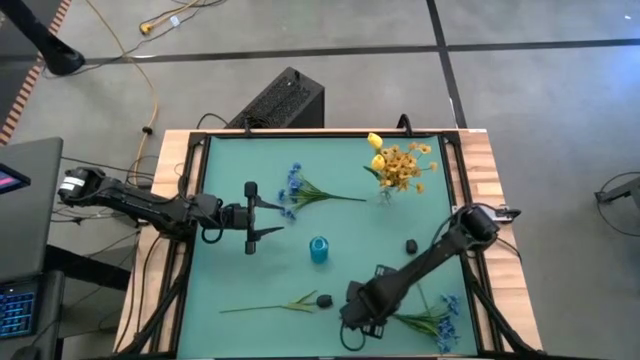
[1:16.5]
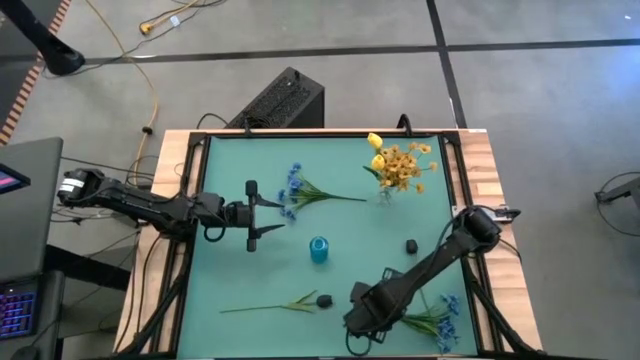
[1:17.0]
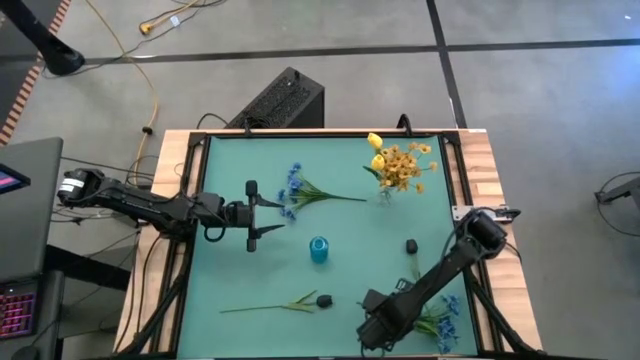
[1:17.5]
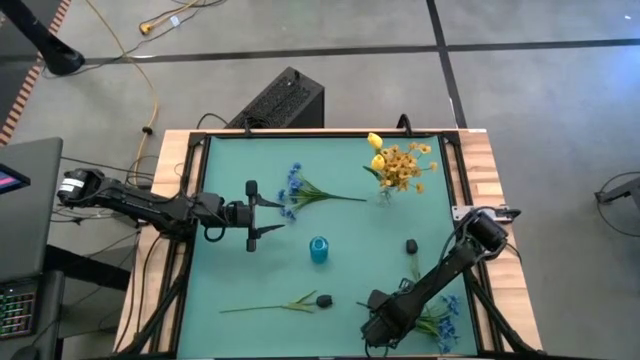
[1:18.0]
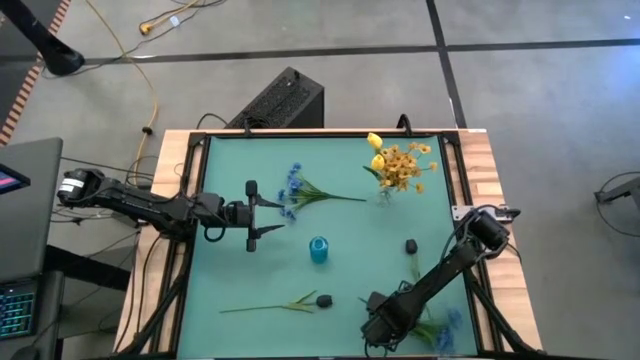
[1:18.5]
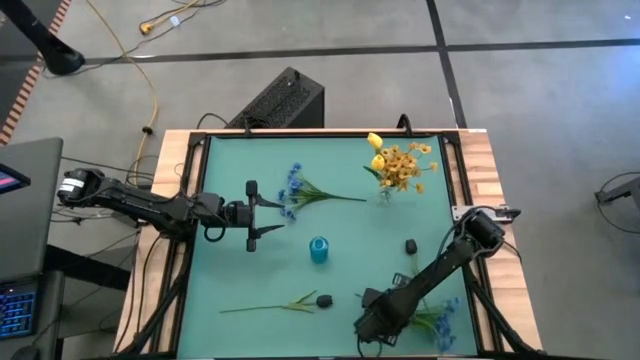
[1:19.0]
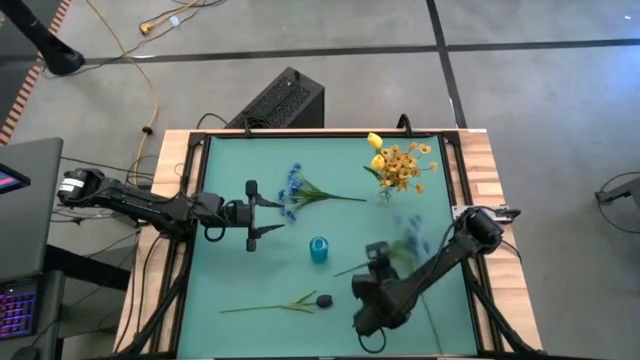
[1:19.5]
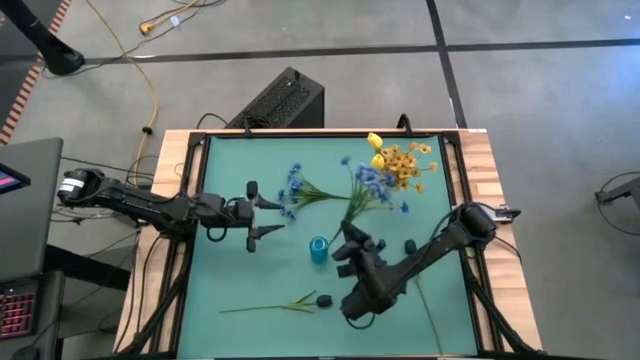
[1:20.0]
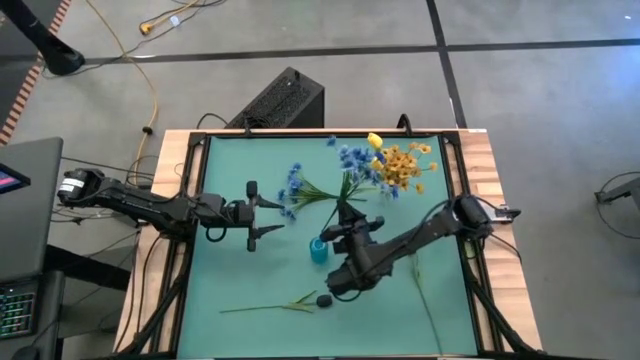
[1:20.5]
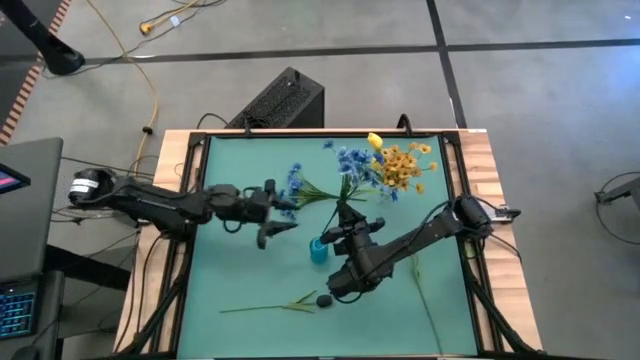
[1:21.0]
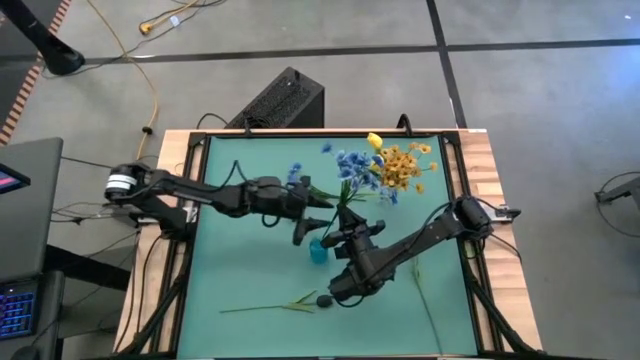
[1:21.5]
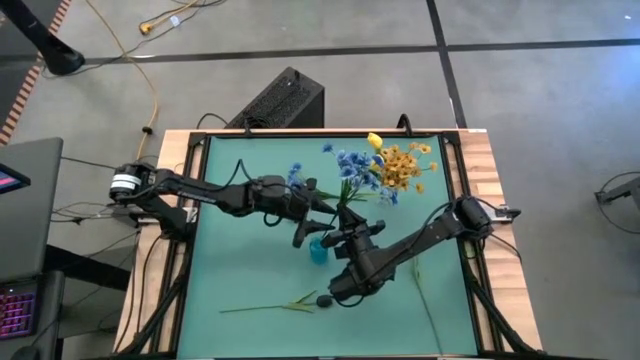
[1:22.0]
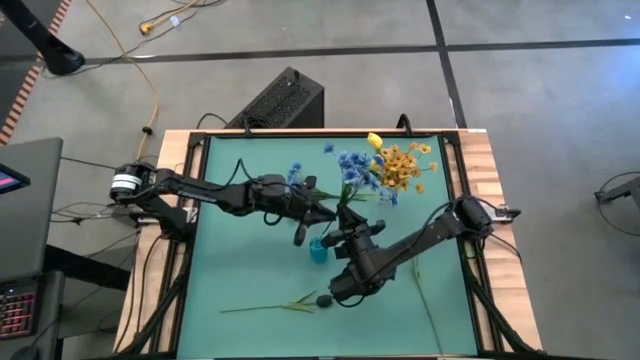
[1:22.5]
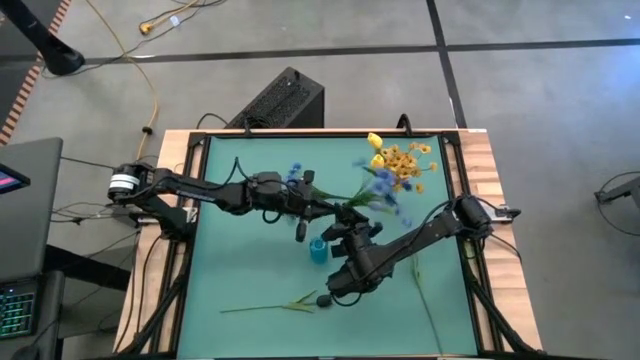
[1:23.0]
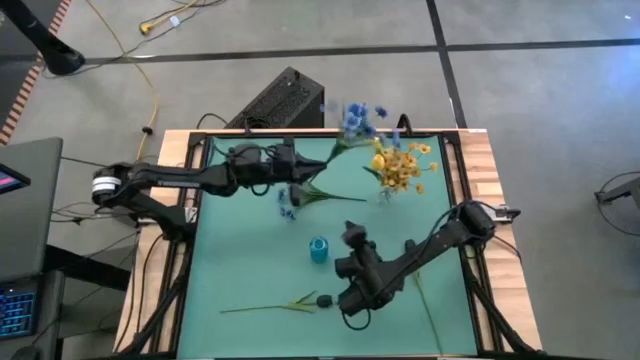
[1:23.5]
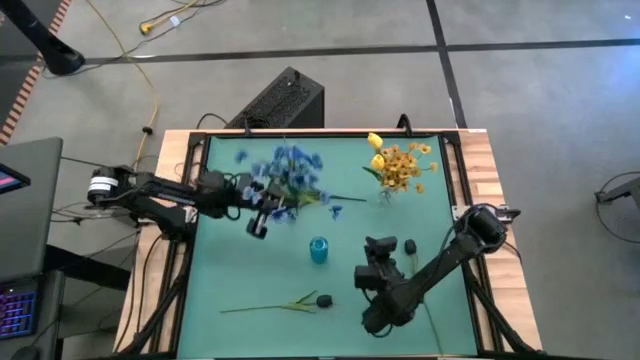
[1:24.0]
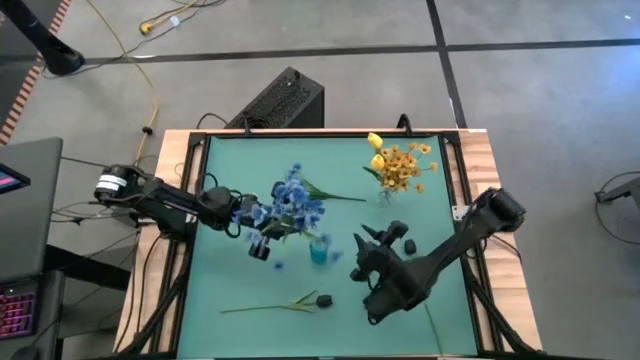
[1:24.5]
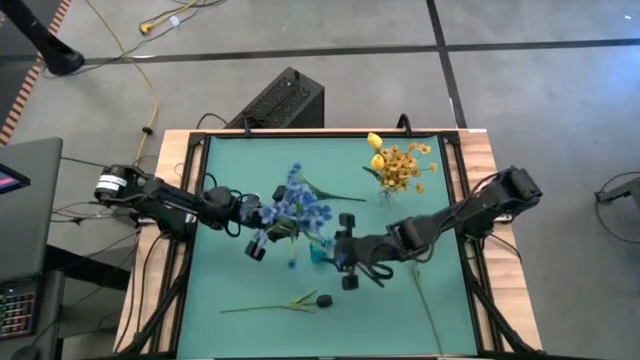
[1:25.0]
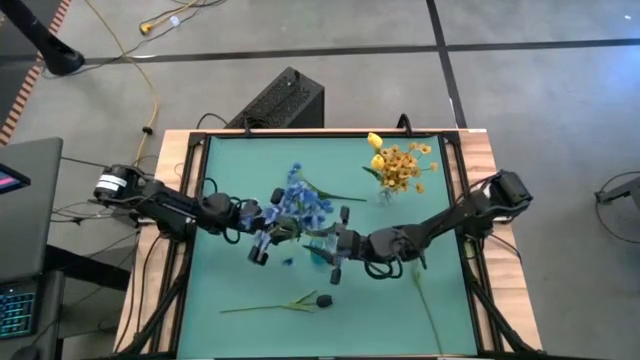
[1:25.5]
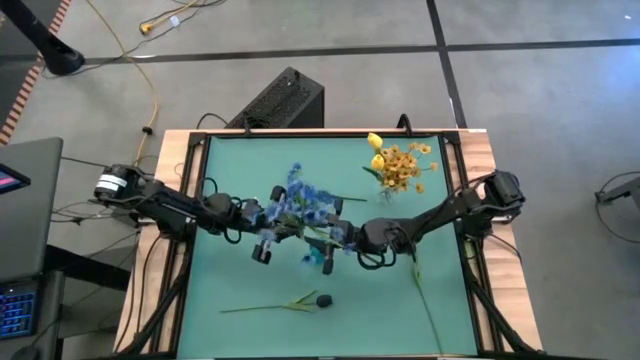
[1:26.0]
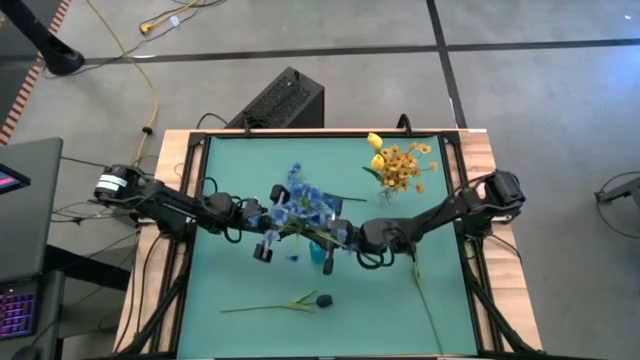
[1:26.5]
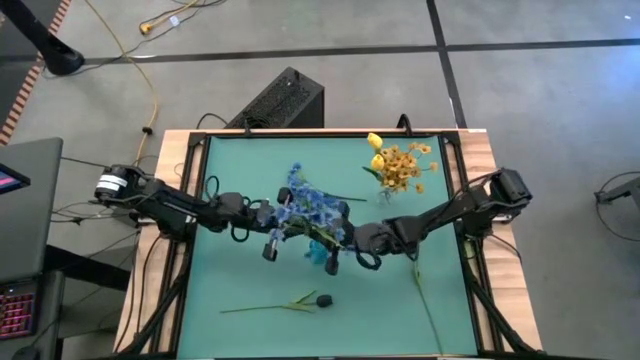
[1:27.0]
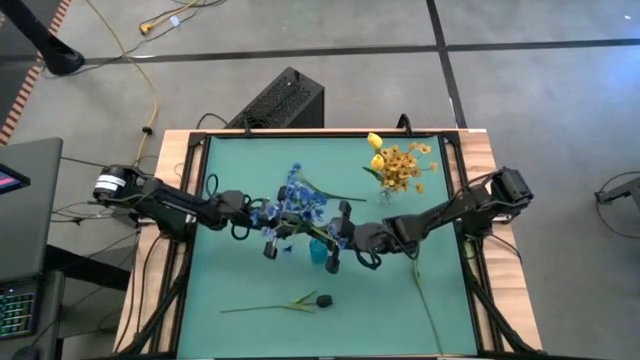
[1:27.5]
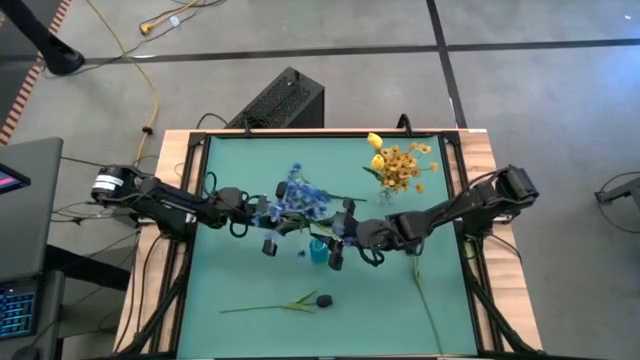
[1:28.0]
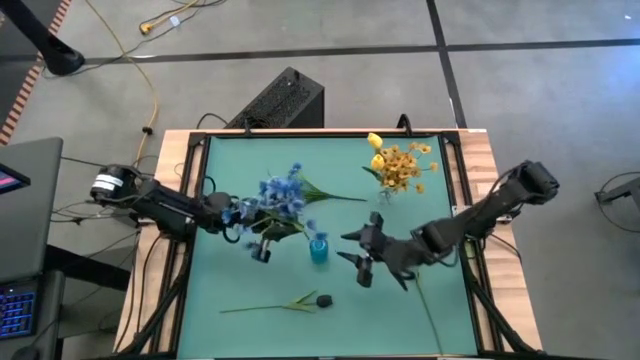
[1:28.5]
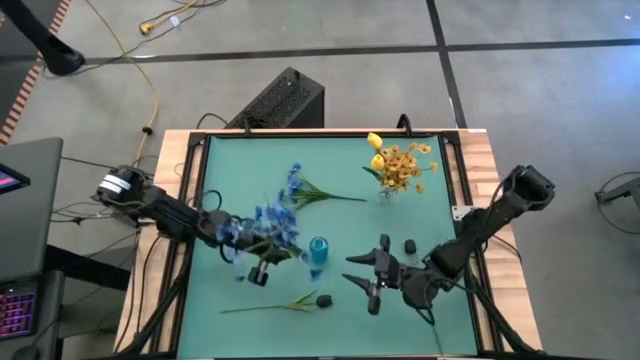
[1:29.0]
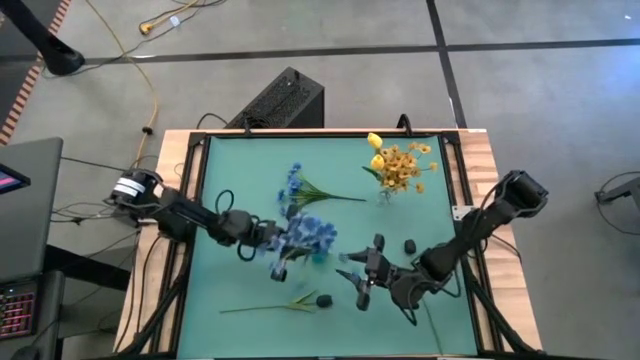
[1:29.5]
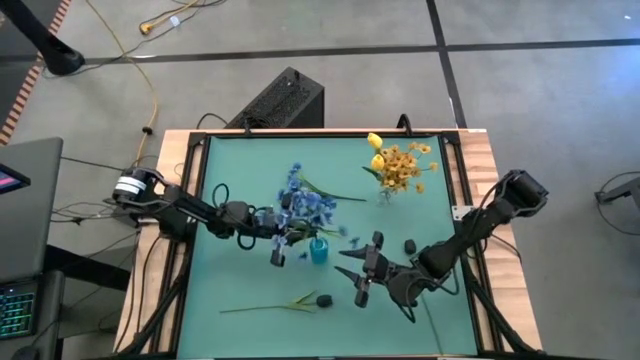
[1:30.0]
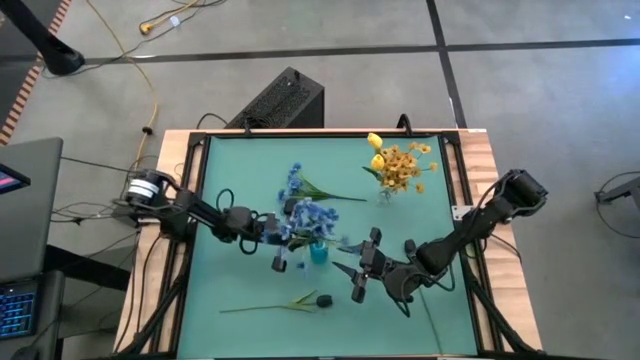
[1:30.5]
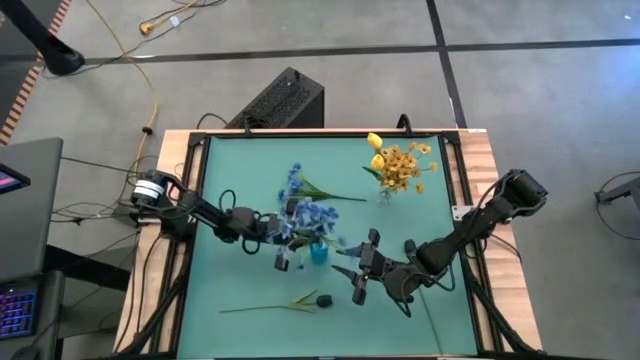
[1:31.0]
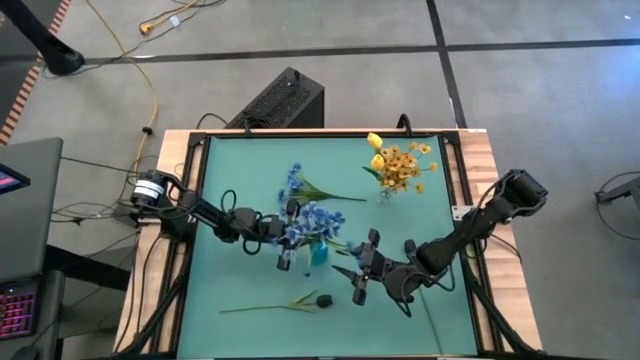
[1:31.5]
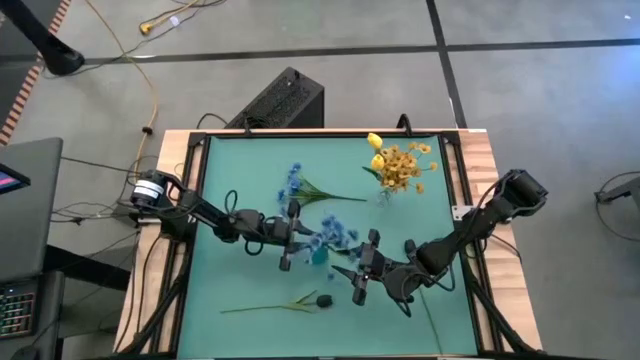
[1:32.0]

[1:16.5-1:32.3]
Task: Sort flowers into vase by color
Put the bottom blue flower into the blue transparent vase

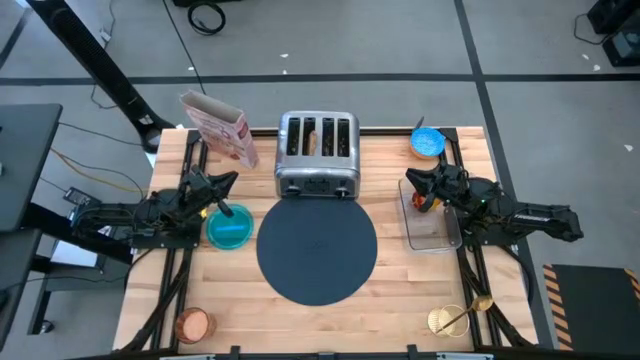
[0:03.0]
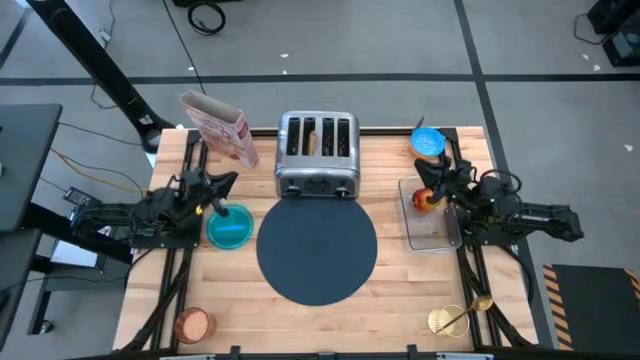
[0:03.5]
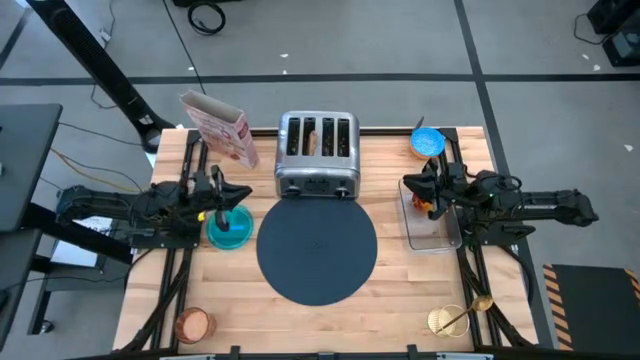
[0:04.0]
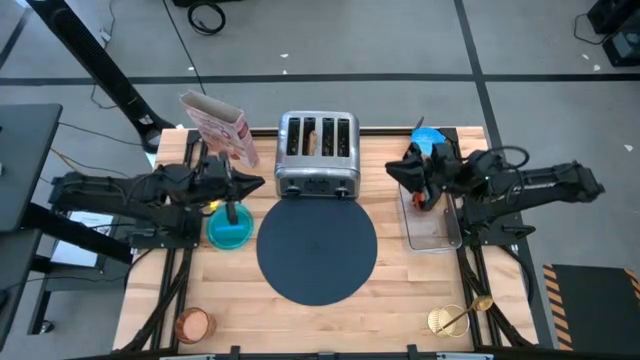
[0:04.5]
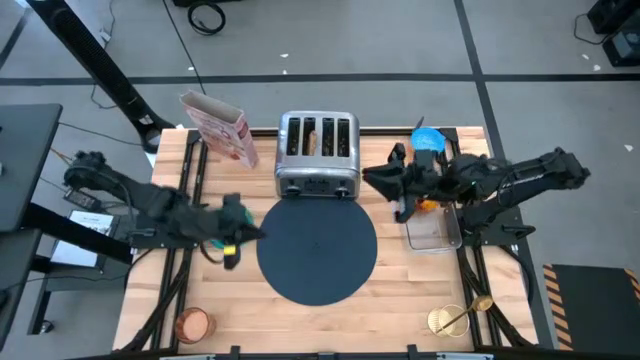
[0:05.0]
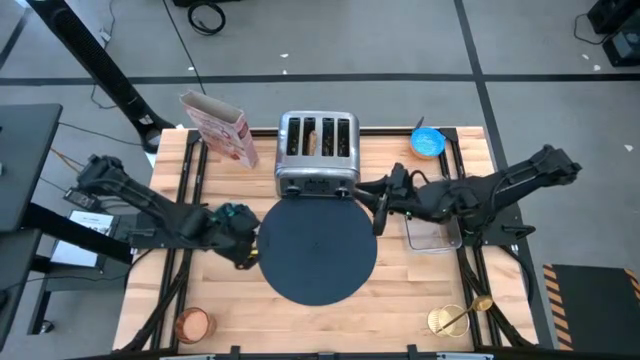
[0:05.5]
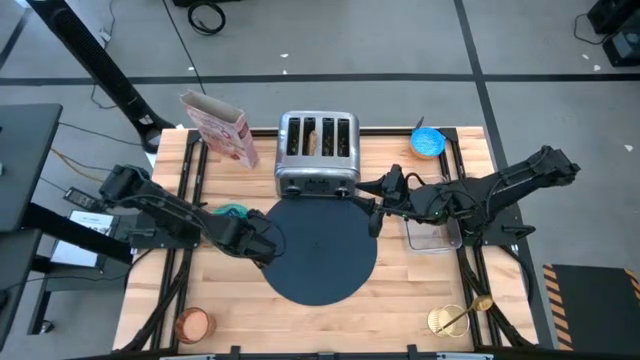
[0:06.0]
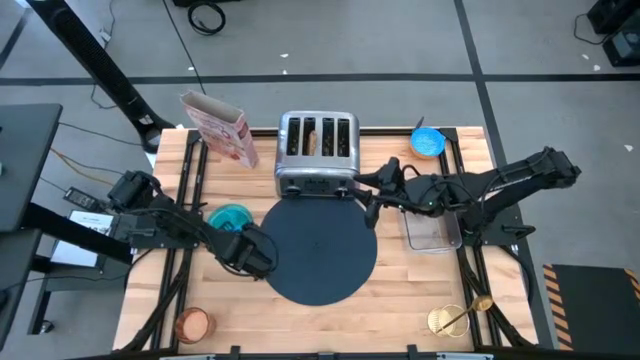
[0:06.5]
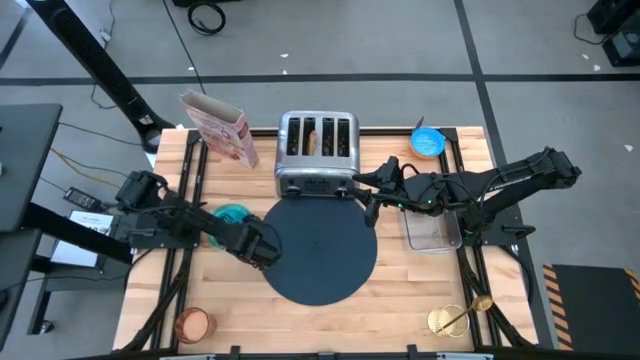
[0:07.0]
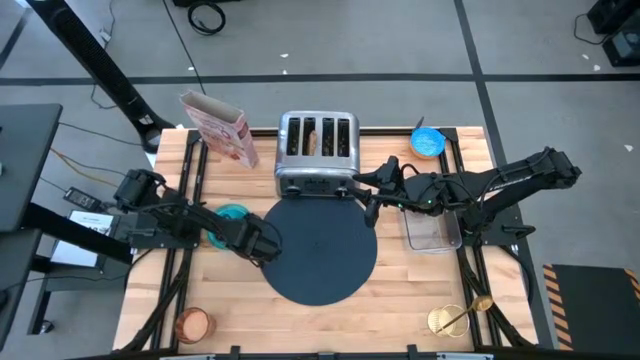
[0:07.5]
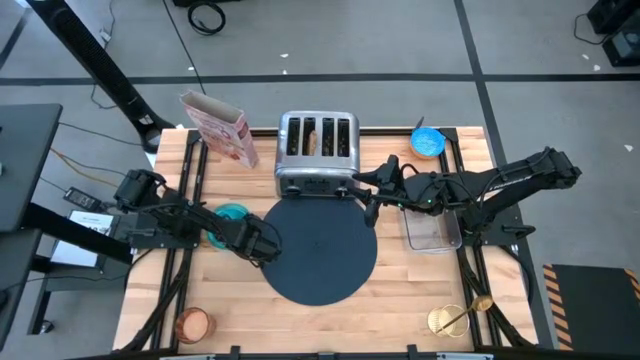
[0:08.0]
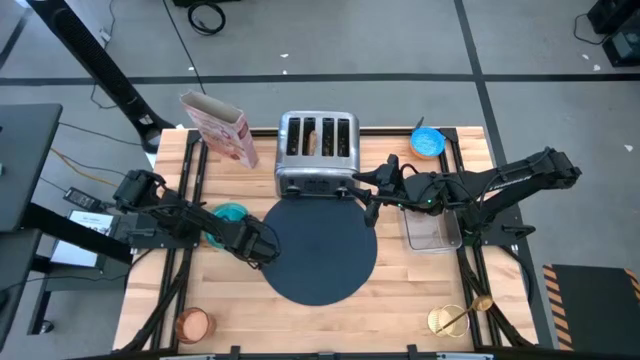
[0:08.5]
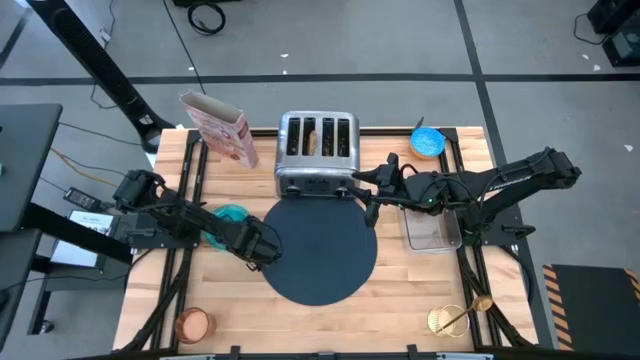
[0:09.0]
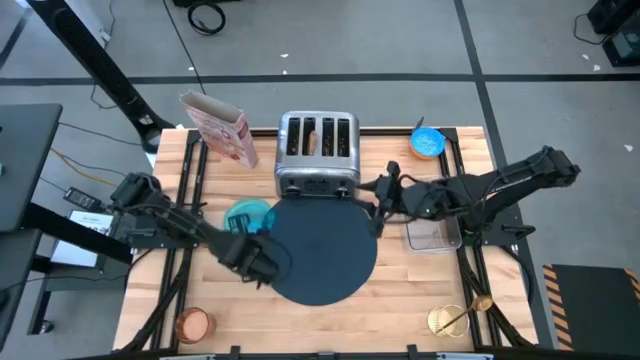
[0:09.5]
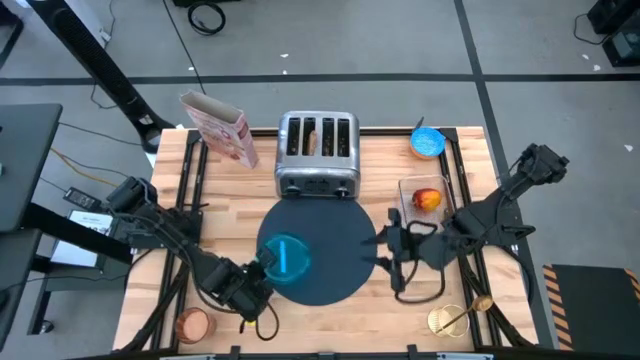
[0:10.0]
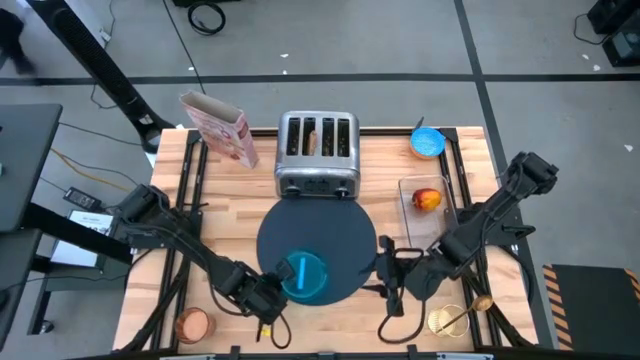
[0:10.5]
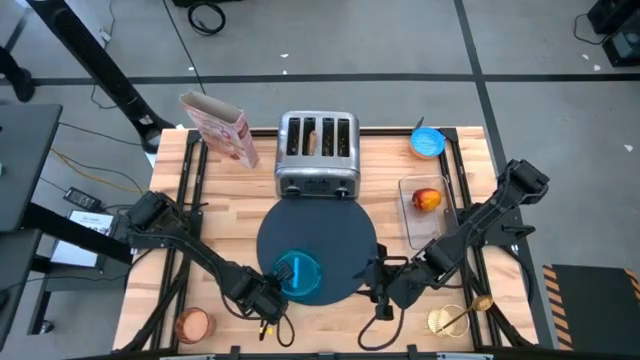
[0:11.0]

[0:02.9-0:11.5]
Task: Arrange a breakfast setting
Put the blue plate on the blue table mat
